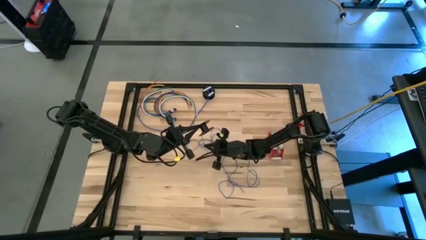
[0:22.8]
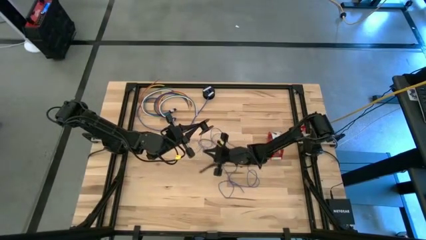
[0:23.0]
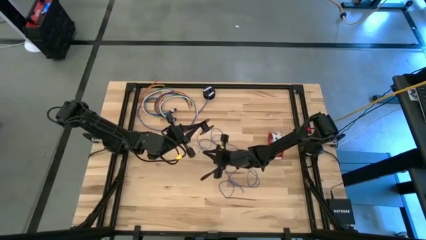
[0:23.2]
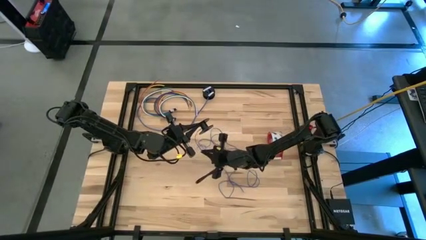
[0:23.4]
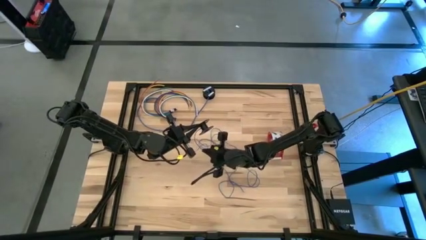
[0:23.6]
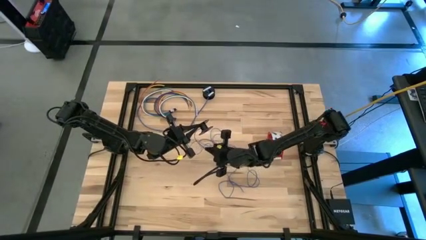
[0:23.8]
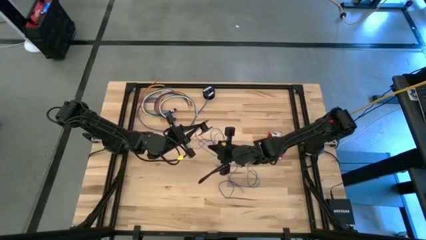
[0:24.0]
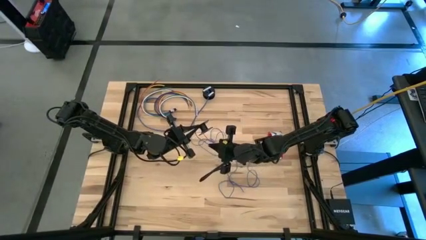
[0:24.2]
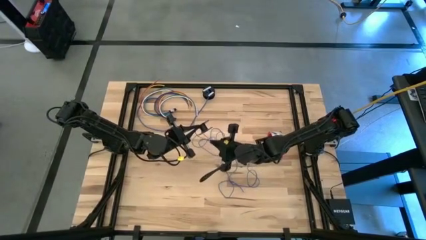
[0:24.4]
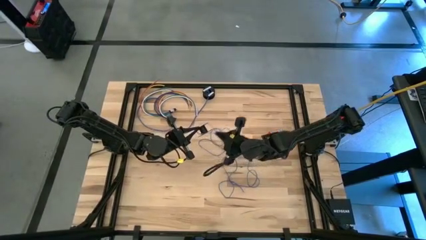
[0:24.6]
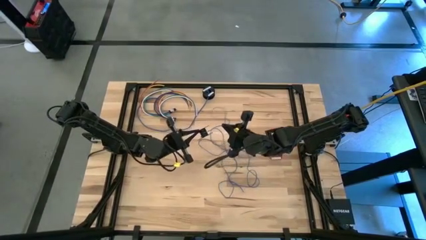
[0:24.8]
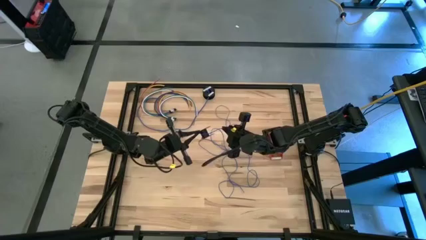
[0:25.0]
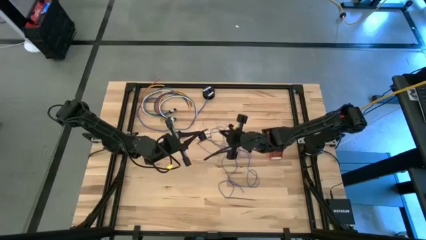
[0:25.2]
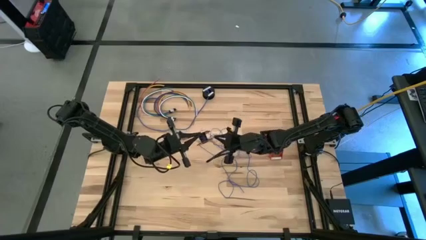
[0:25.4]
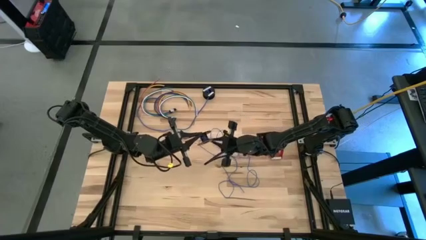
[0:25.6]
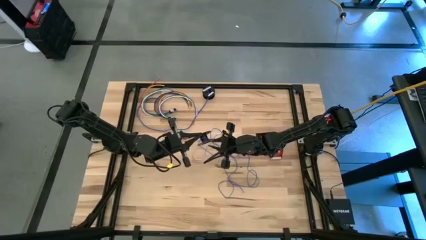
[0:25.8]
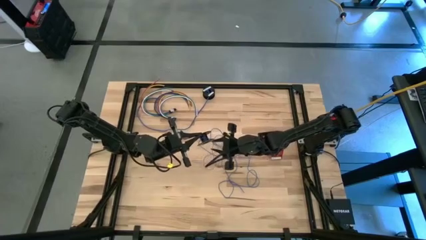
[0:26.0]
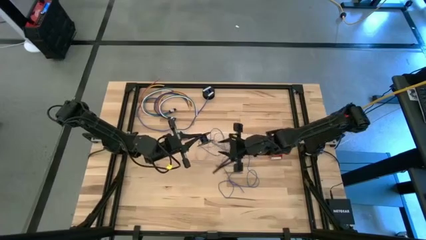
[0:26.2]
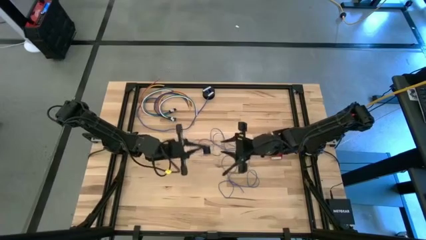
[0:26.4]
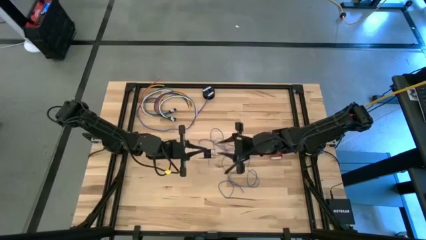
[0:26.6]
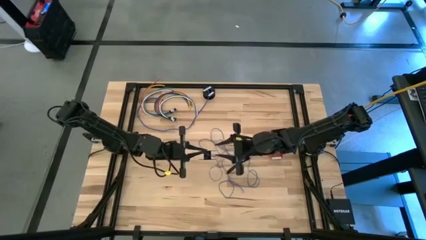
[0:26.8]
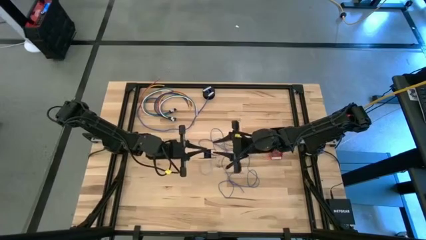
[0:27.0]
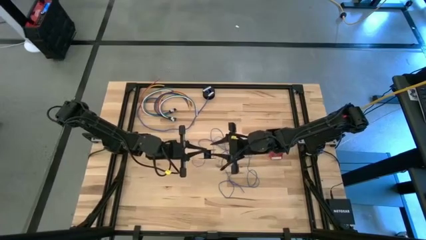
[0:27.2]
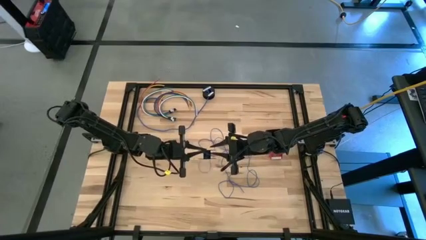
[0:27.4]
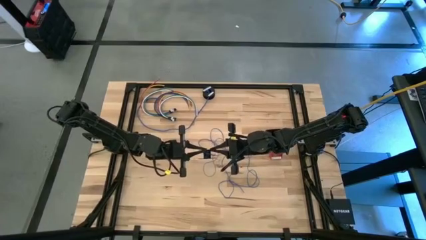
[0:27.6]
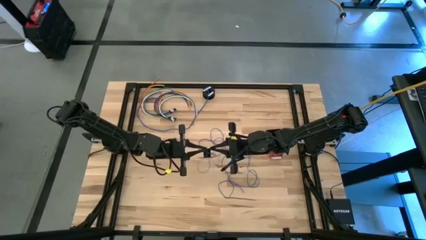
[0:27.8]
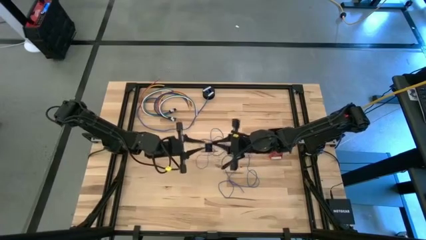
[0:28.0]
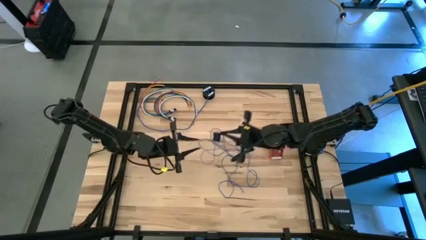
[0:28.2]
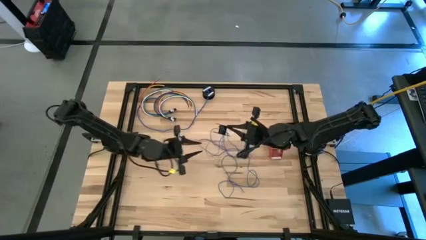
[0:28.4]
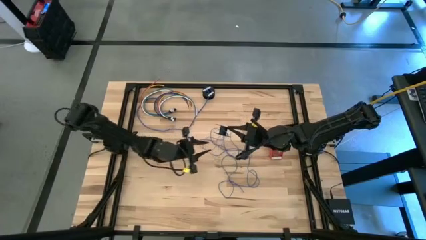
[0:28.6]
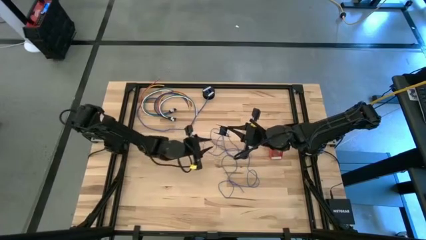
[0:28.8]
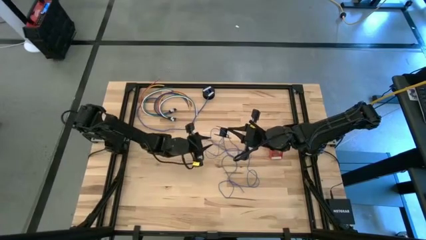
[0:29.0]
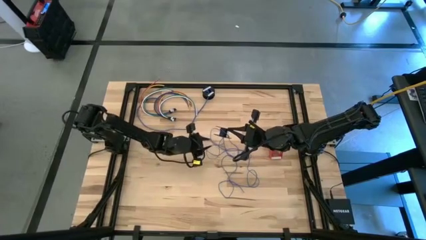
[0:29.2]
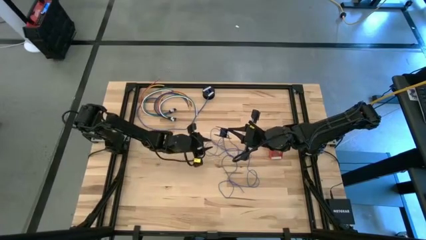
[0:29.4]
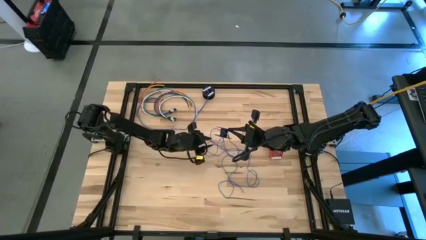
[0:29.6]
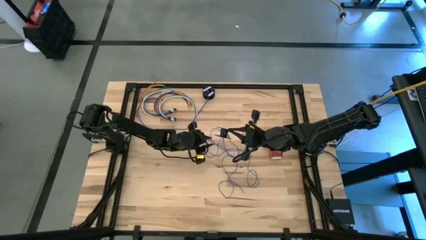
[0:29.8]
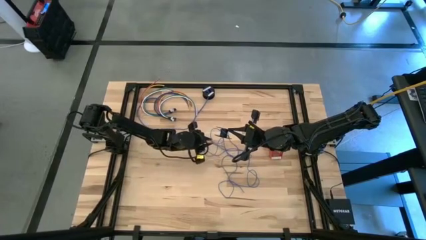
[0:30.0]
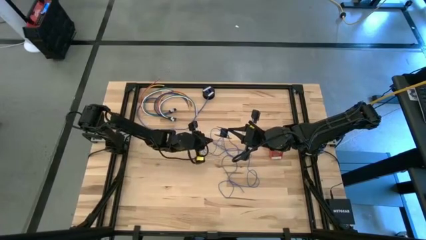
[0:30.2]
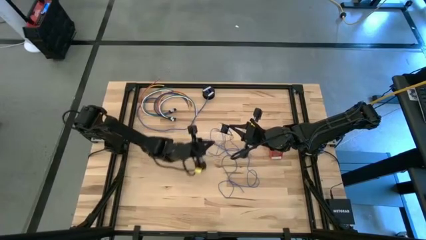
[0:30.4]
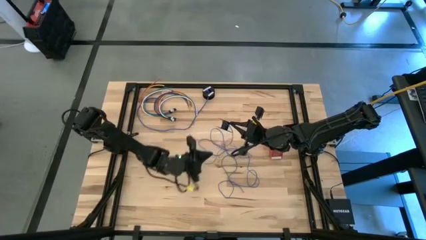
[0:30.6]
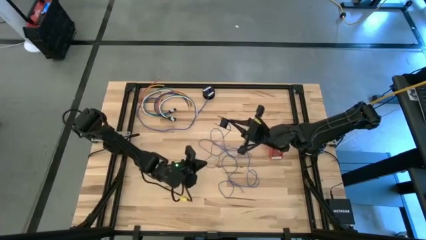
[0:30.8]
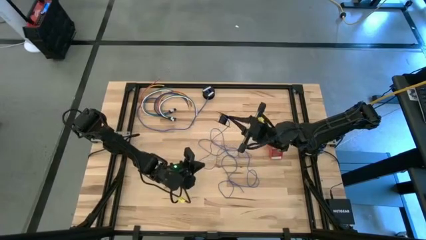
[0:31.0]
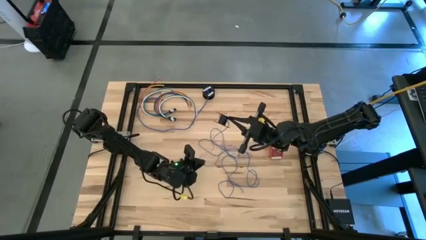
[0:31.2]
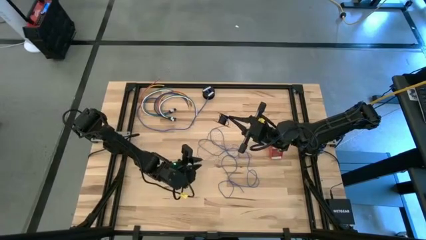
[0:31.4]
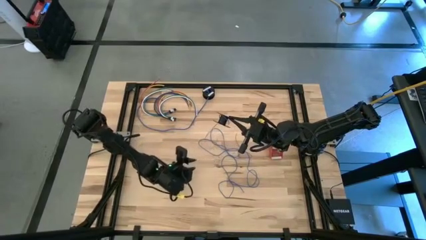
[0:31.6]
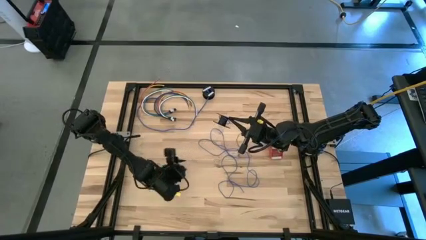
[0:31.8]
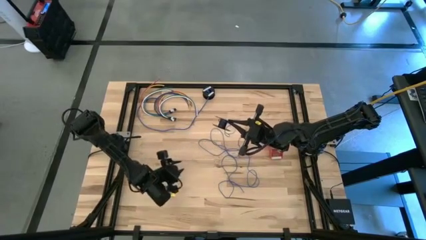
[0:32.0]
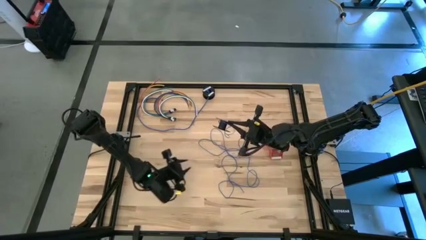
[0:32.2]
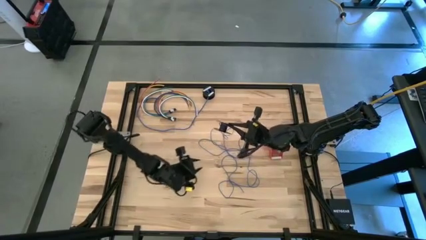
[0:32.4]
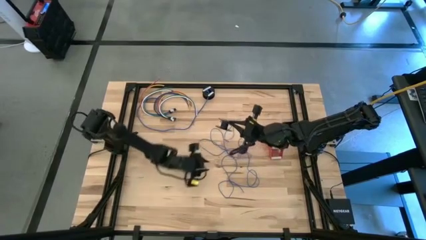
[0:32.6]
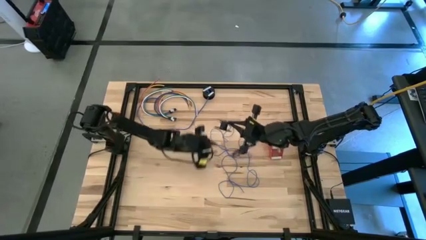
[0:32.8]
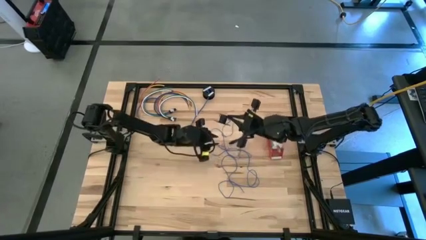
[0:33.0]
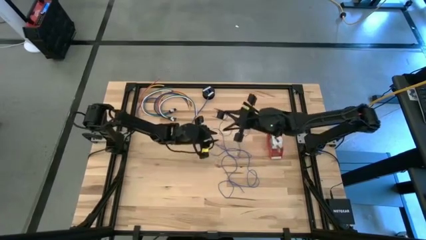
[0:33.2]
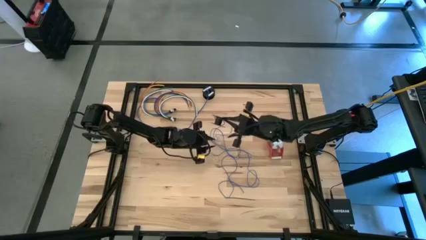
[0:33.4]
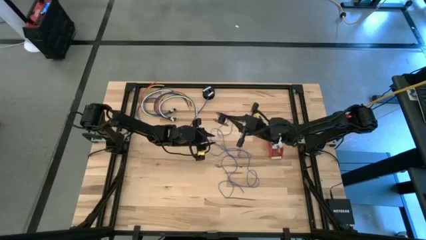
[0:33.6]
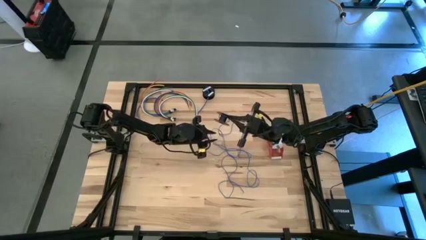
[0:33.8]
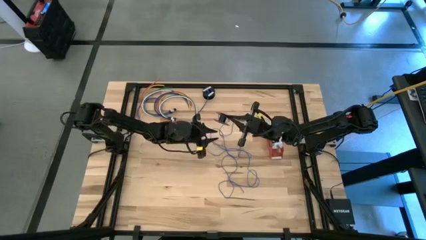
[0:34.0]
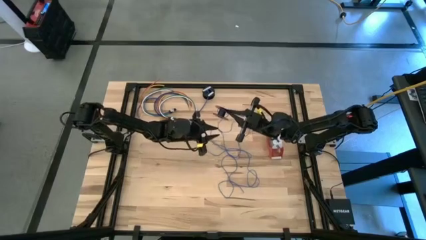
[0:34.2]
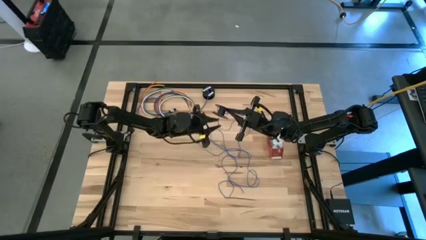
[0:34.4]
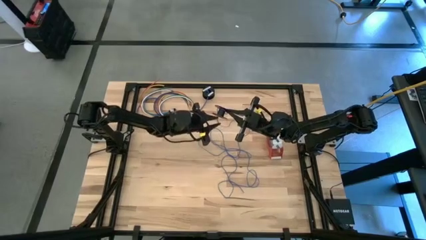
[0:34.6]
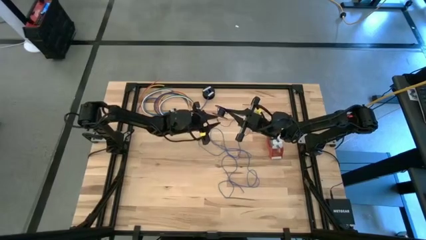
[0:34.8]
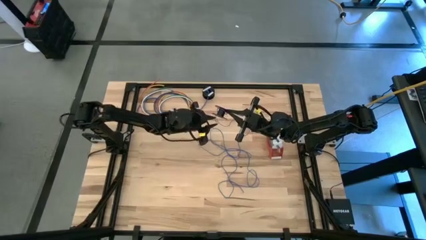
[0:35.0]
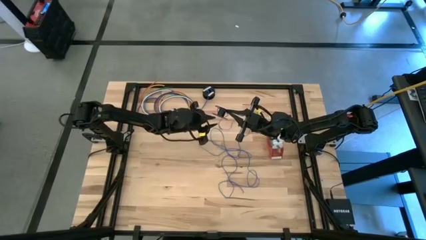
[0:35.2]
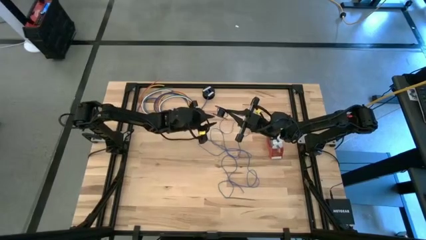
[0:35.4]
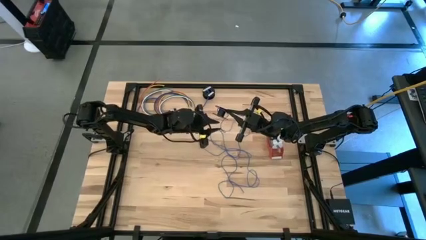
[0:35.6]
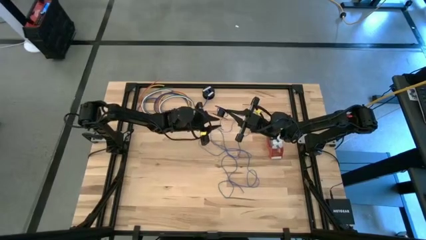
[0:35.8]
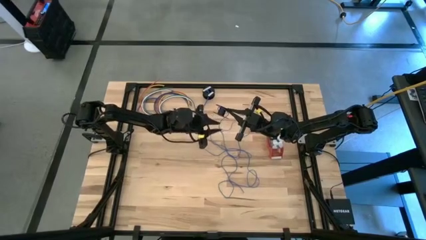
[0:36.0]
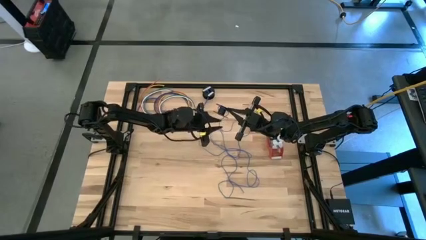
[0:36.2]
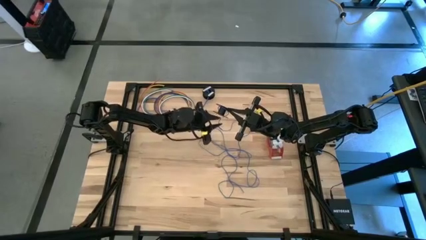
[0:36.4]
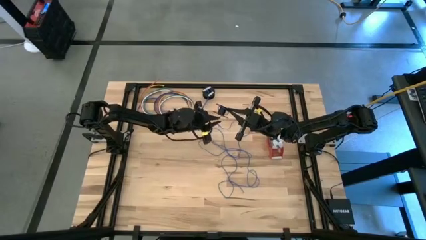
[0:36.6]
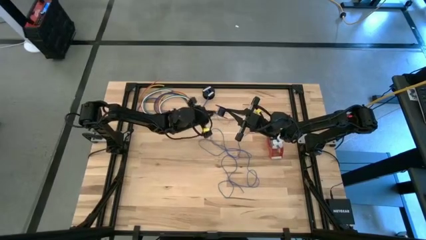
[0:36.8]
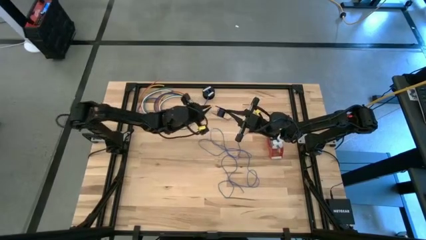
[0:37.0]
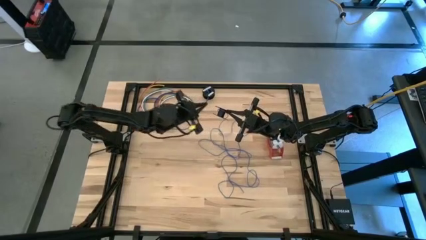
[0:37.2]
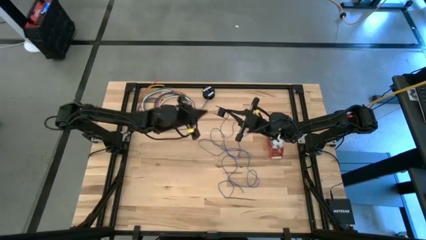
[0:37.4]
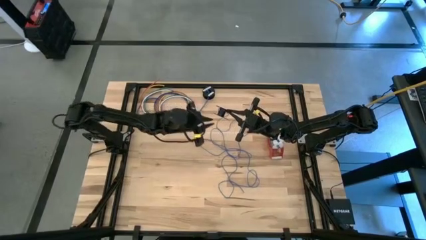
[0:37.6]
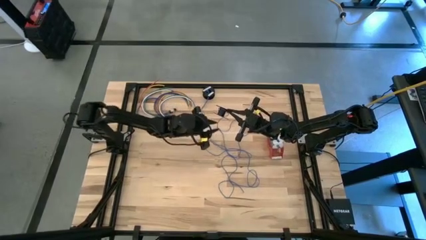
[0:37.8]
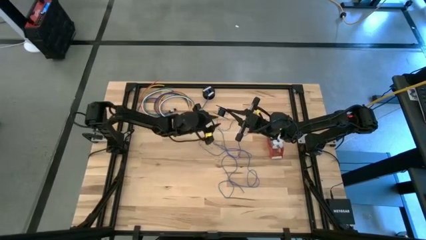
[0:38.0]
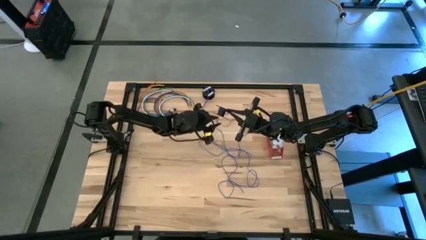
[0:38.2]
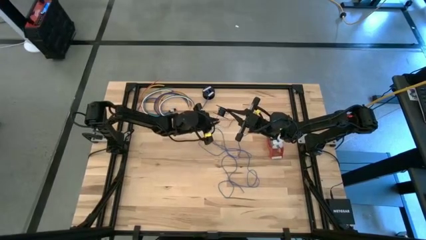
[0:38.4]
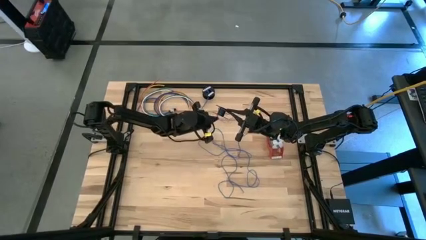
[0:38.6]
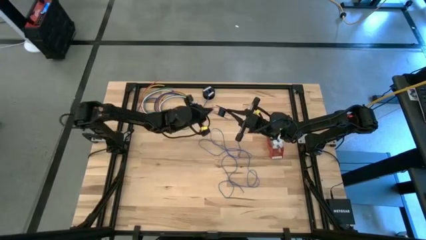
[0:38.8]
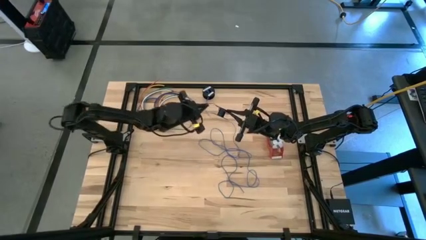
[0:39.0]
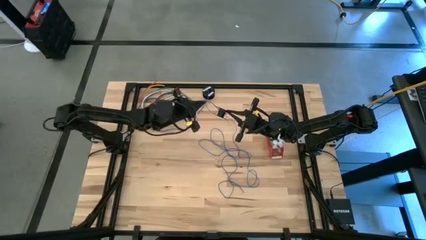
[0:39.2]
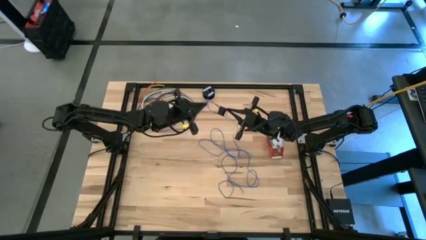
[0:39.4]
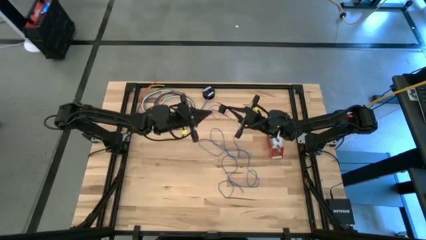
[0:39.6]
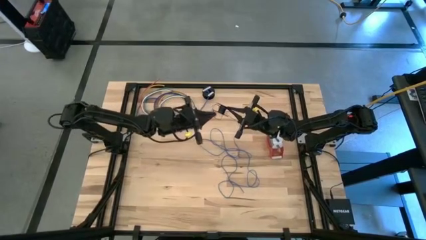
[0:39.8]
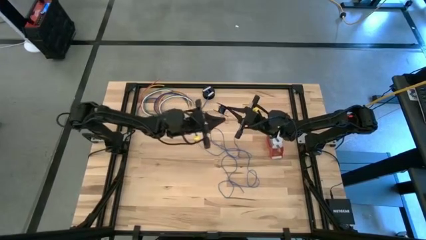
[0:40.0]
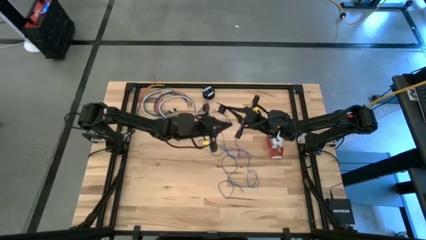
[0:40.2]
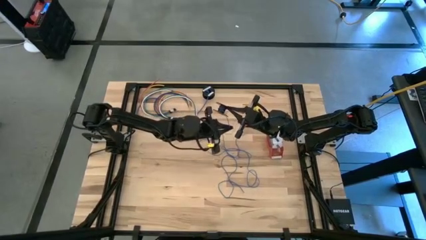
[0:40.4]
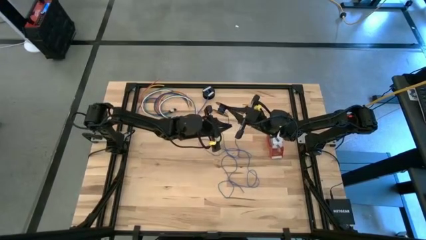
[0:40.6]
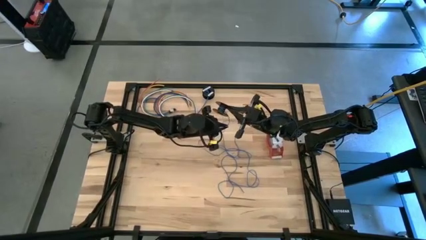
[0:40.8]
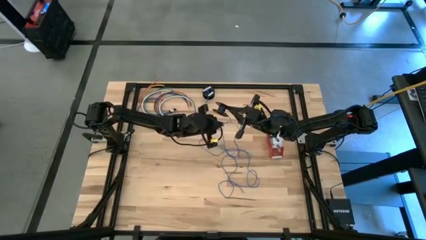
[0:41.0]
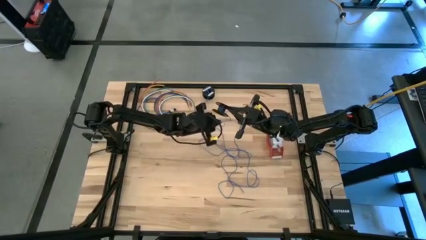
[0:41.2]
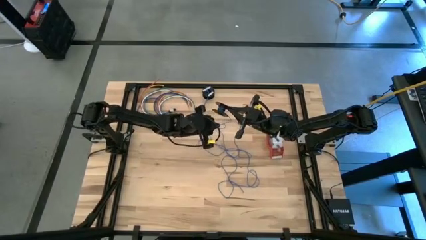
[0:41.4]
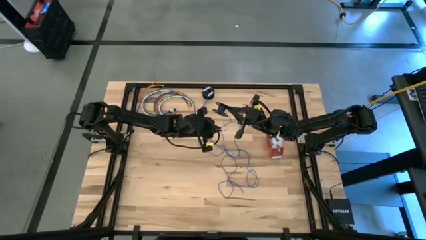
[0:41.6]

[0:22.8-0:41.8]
Task: Coil cords
Coil the blue wire onto the spool
